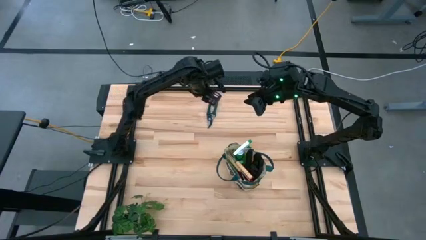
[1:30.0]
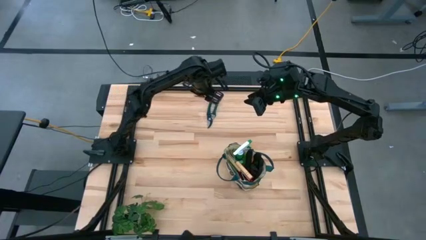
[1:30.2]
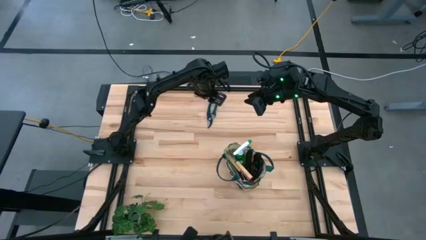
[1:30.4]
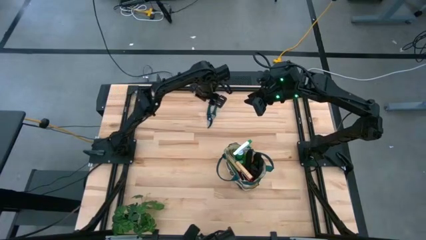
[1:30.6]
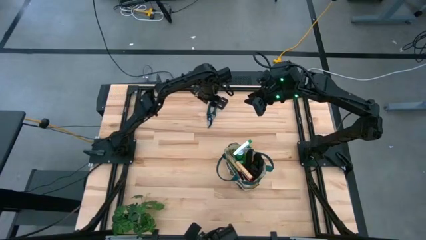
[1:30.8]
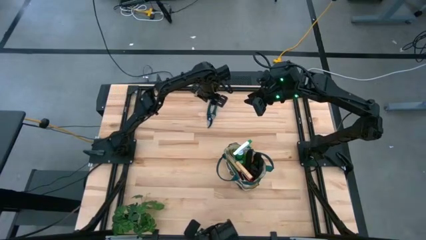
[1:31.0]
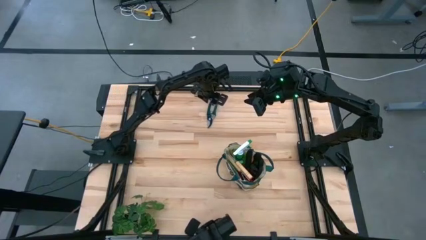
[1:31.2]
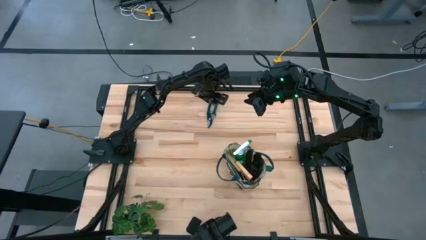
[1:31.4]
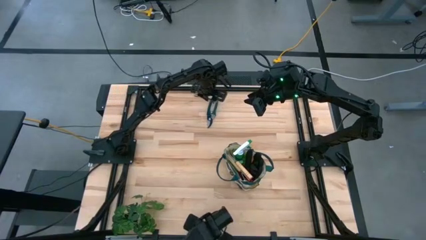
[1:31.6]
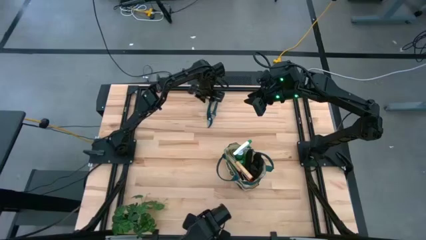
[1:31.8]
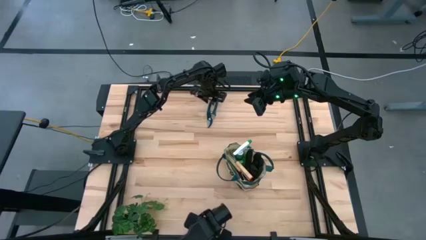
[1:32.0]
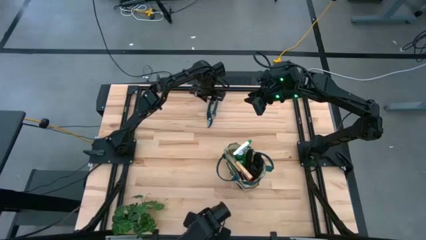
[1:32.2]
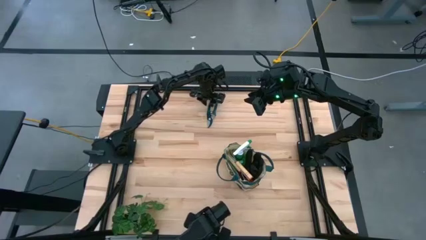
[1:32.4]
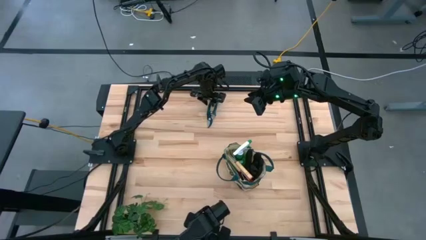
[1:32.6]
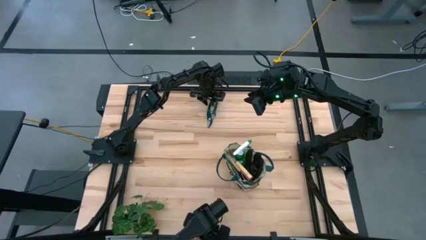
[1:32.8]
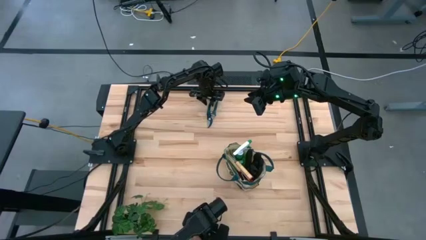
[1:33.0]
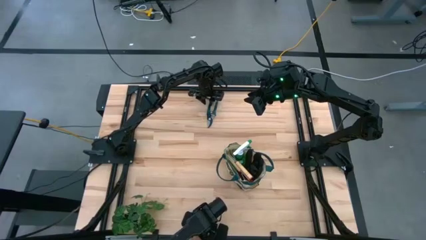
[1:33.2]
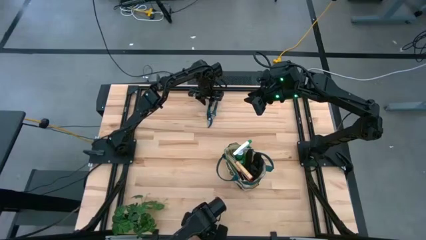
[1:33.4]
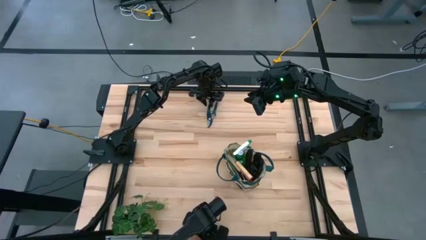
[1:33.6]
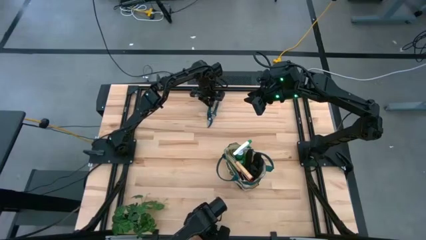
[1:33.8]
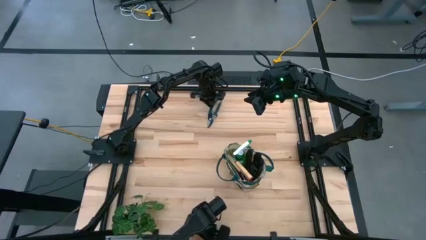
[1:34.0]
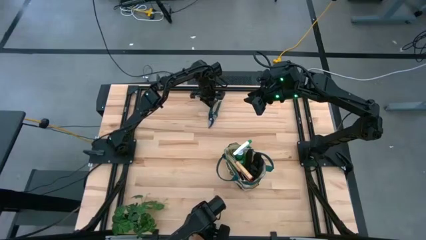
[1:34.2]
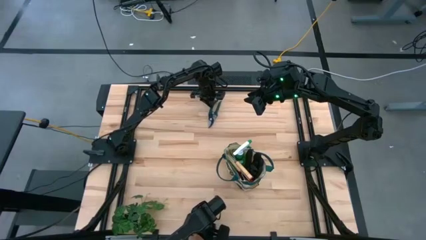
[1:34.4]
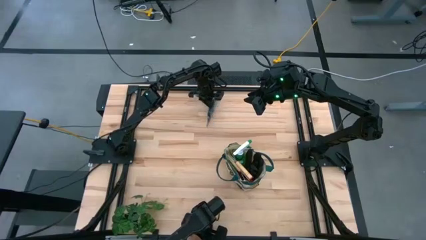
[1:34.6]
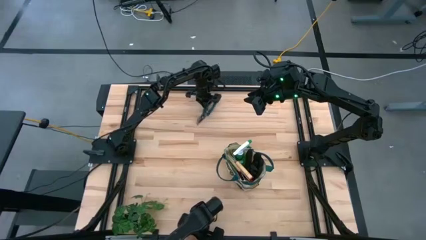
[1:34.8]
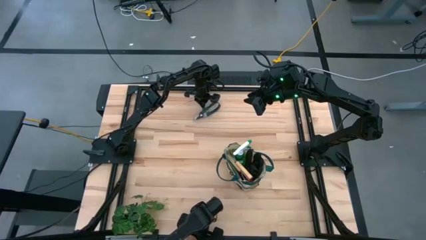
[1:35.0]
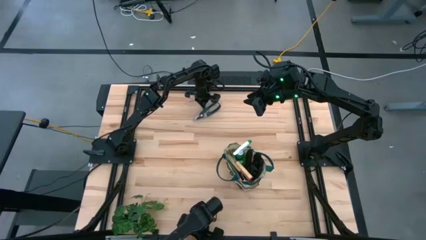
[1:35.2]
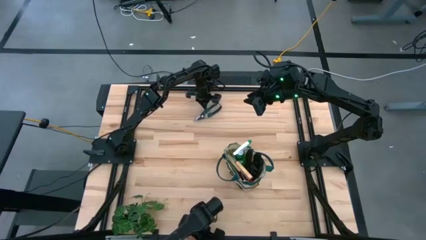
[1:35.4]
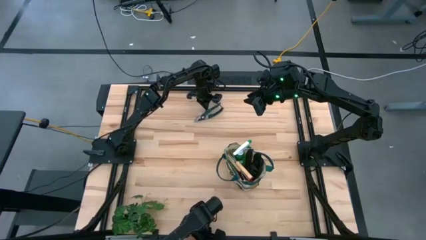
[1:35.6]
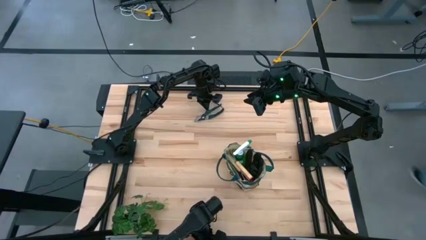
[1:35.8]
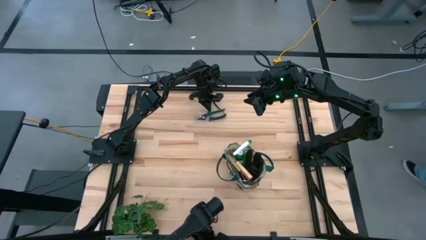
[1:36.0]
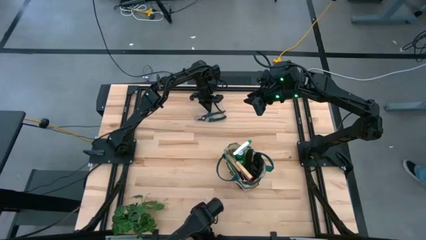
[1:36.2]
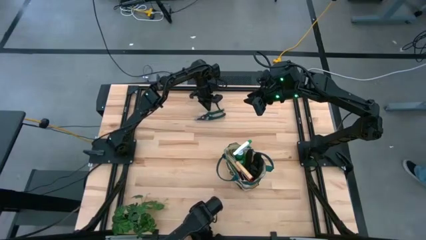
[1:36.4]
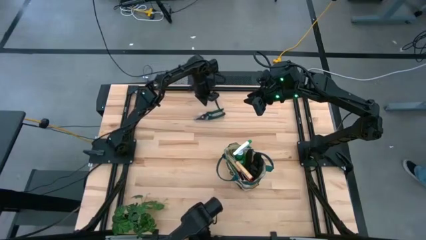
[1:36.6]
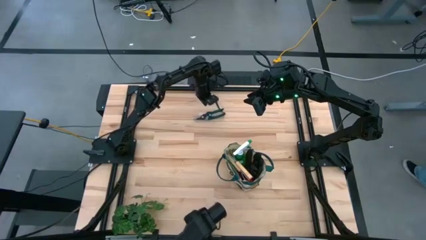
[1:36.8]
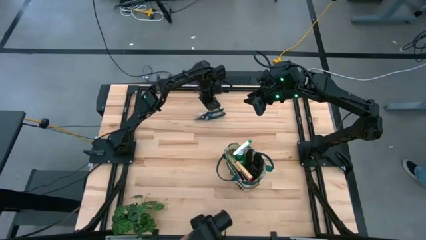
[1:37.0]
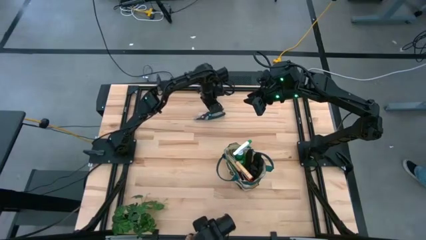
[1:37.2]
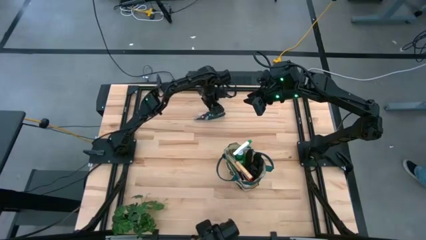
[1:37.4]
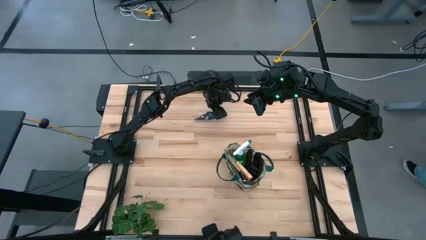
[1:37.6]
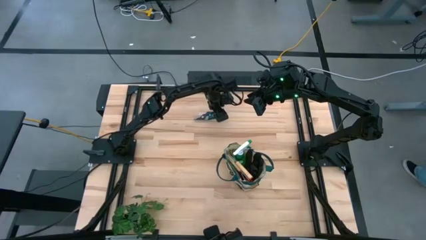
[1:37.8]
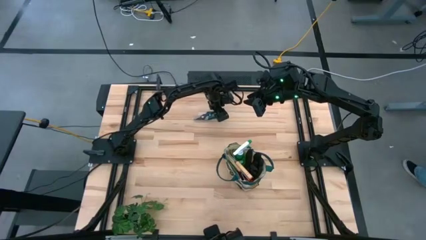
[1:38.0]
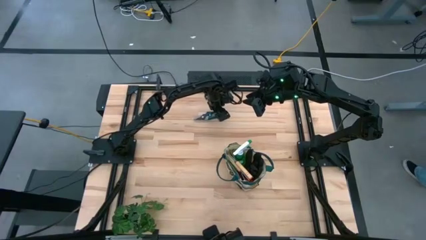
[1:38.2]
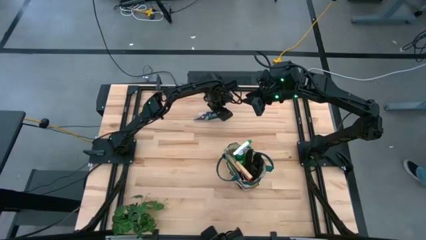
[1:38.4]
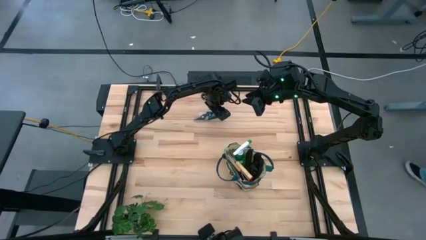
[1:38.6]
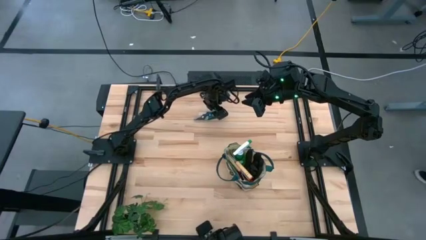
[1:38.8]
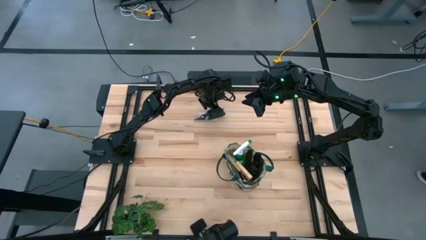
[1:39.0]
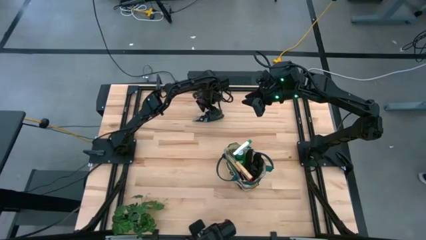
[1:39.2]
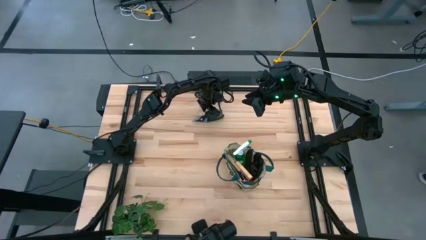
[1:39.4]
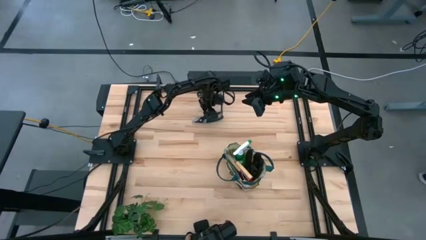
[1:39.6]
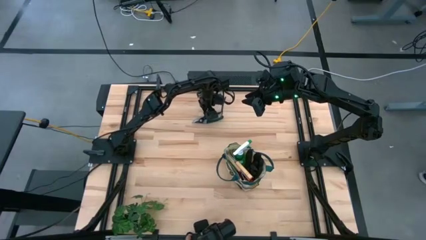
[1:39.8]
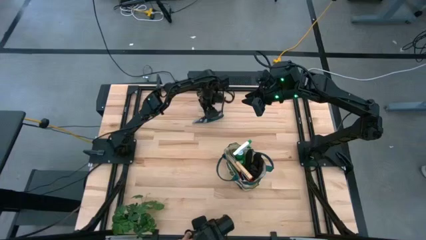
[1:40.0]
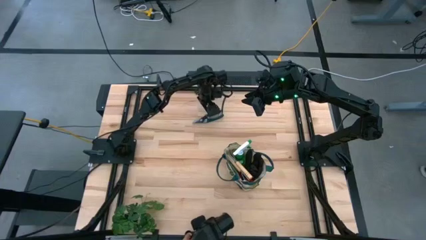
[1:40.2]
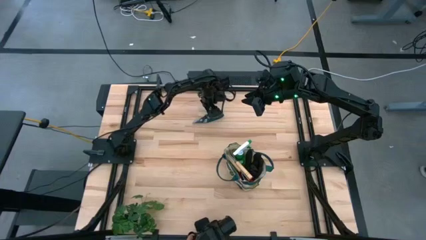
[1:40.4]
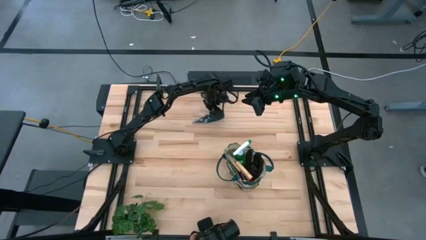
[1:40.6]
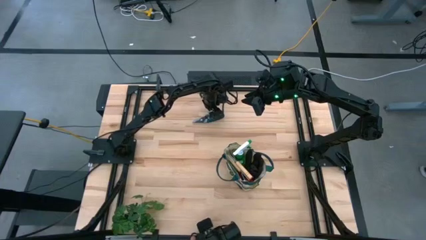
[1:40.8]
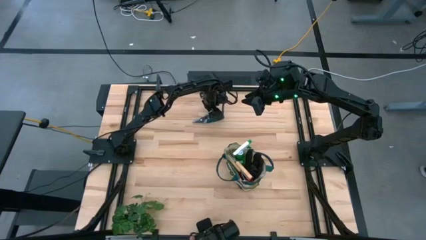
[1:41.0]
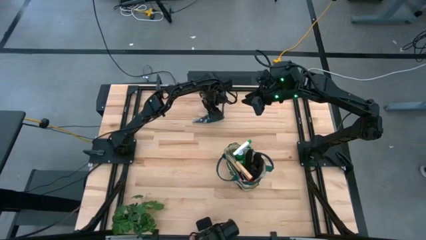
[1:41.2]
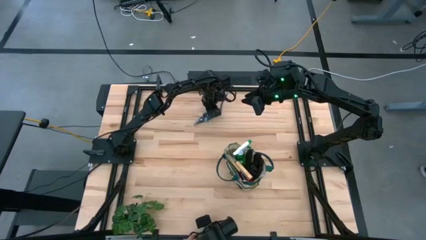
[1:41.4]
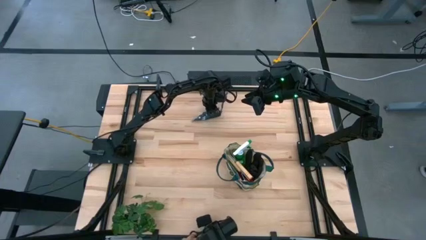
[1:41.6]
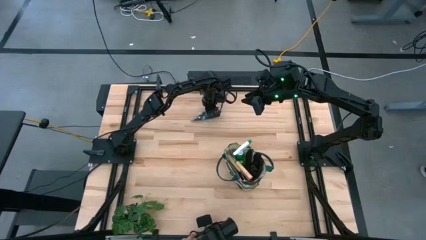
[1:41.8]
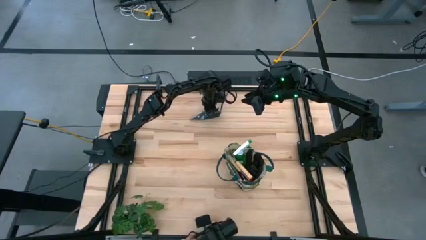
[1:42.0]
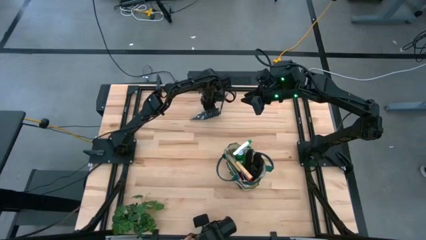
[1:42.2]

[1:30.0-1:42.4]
Task: Pick & Place Garden tools in Gardening bag
Put the green shear scissors into the green gardening bag

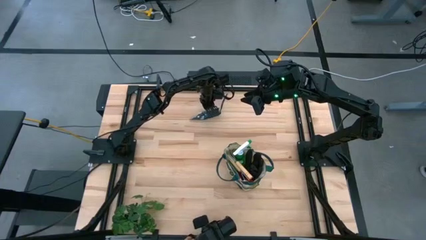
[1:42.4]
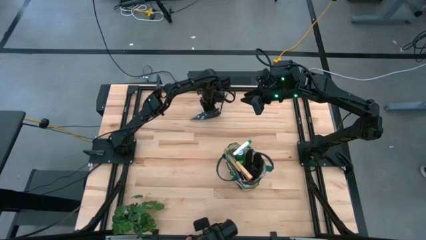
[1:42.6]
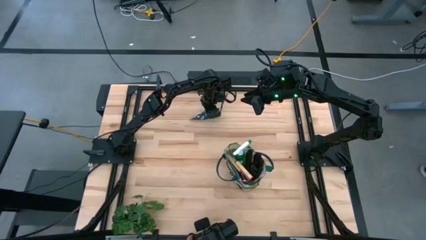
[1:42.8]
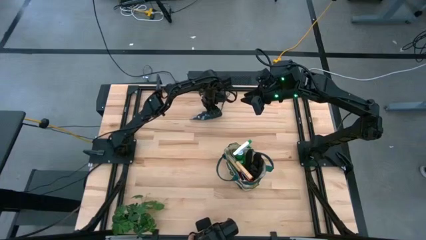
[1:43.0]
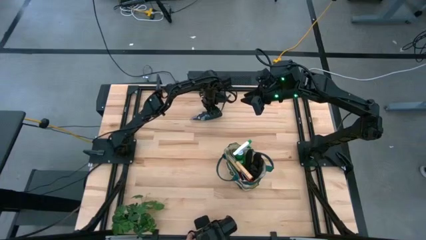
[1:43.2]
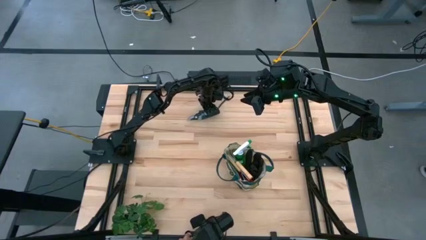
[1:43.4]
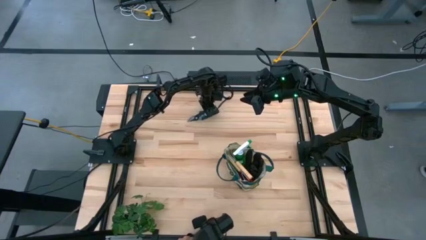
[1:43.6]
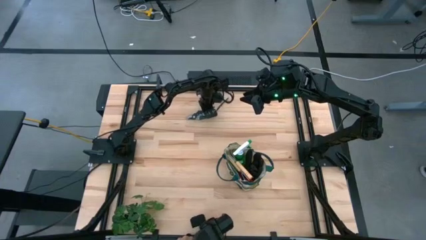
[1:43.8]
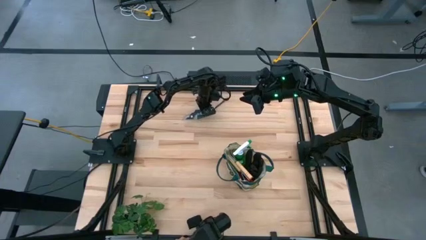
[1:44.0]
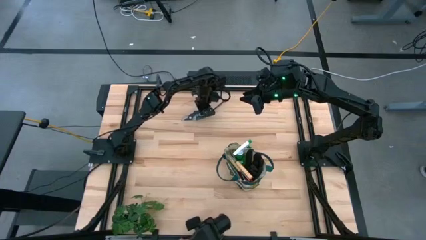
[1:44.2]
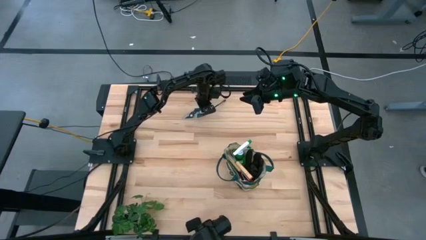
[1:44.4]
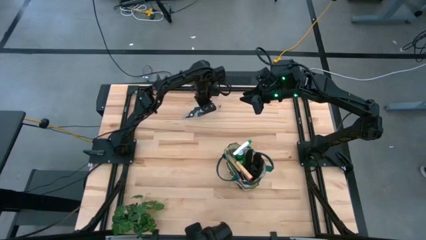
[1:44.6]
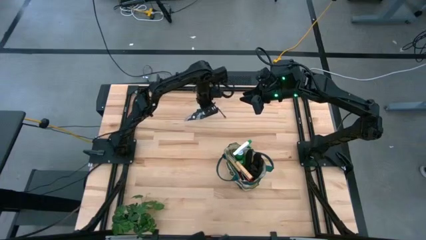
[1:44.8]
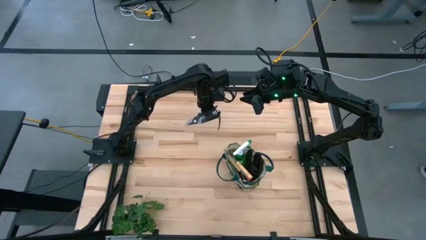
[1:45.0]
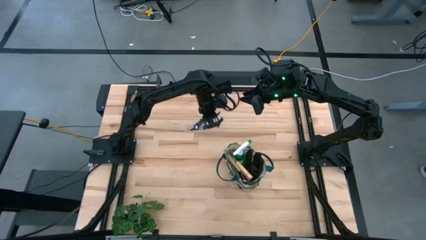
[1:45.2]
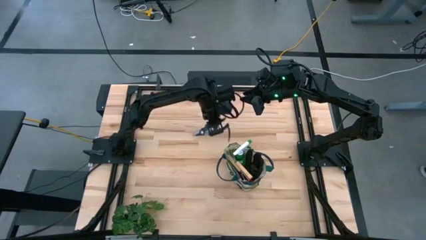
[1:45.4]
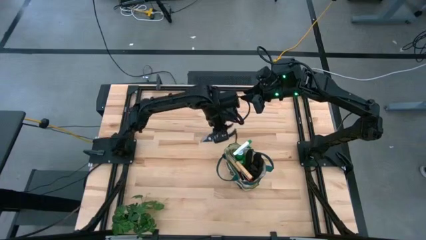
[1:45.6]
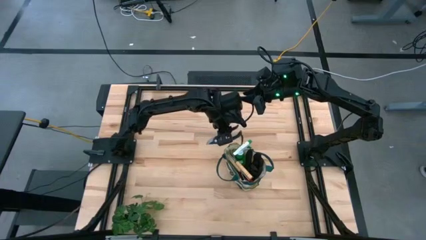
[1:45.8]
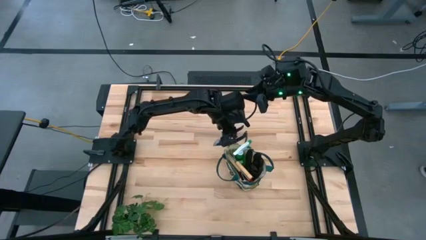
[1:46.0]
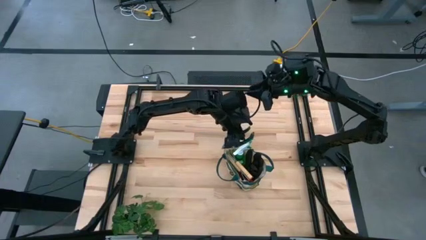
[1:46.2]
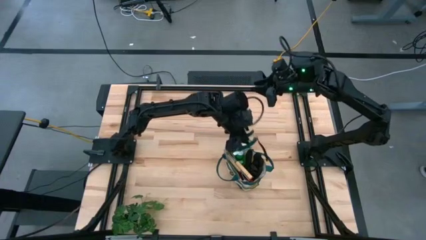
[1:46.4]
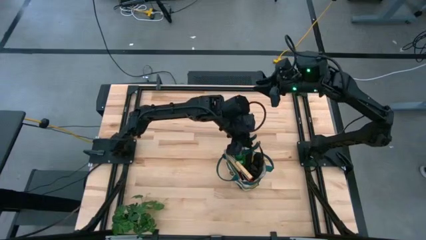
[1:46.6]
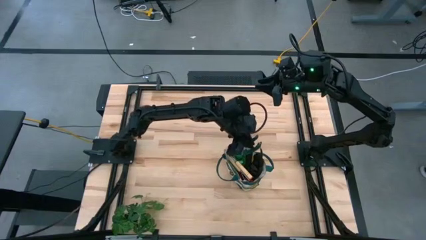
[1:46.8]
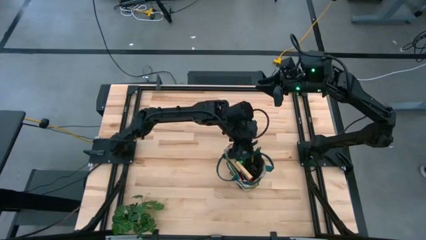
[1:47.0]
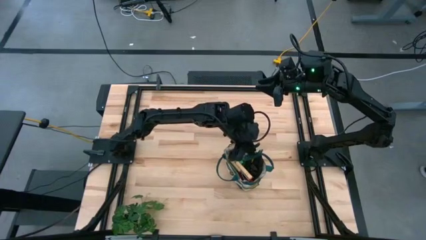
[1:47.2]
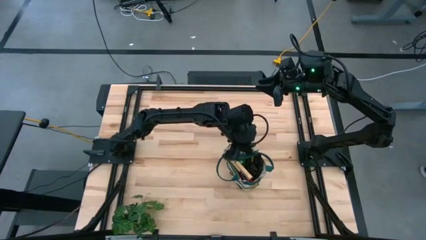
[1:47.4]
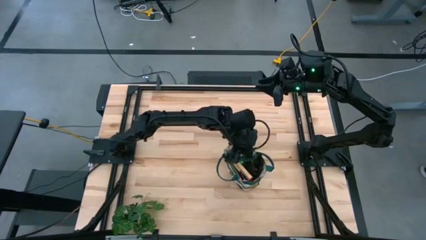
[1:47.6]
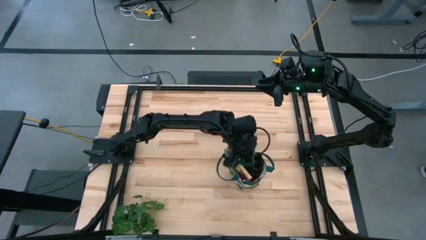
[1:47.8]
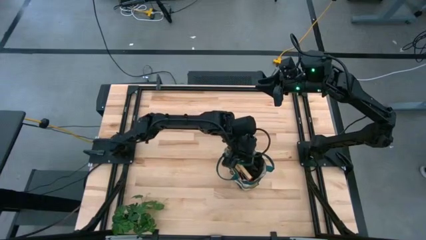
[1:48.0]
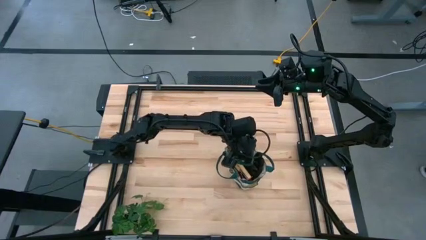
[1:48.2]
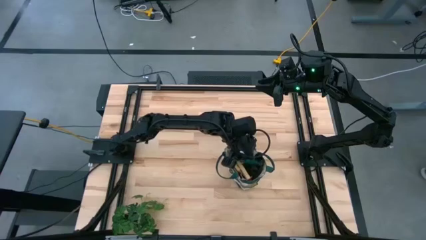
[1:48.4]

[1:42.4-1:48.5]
Put the green shear scissors into the green gardening bag
